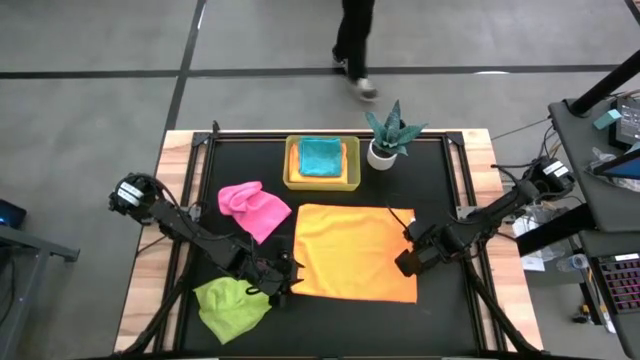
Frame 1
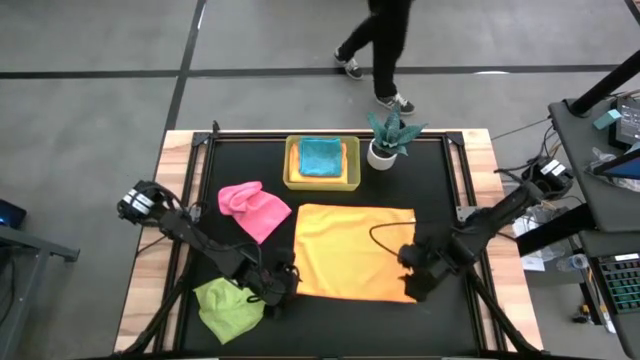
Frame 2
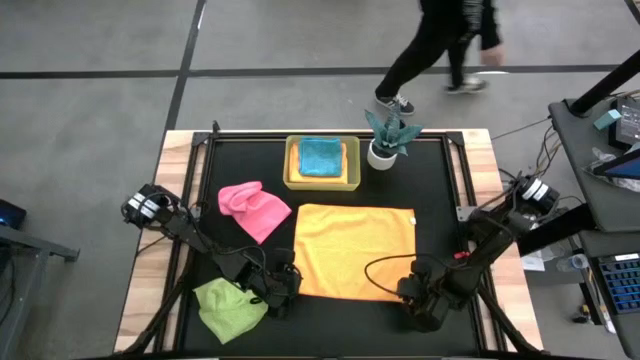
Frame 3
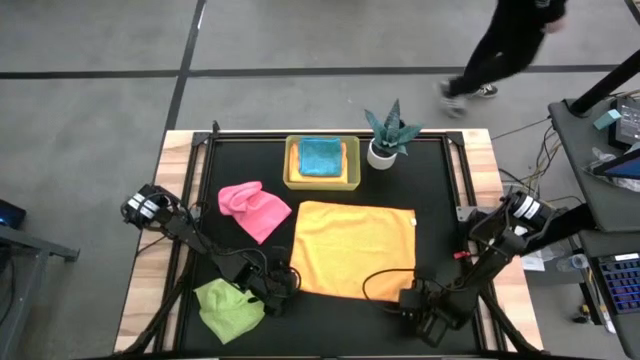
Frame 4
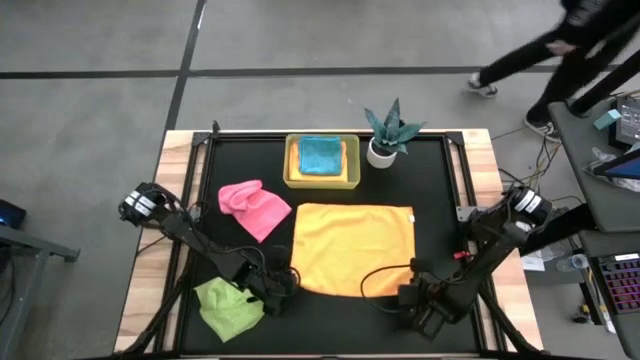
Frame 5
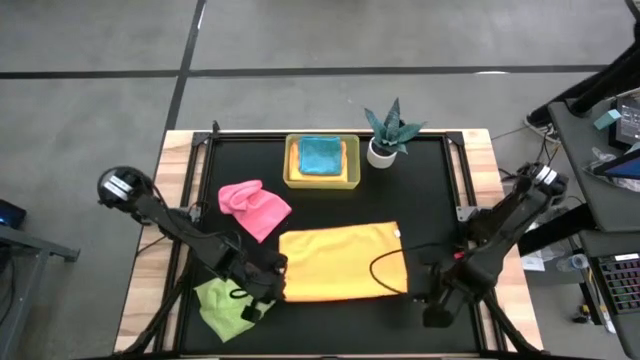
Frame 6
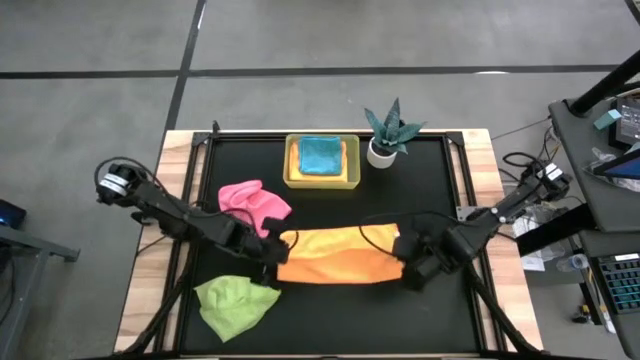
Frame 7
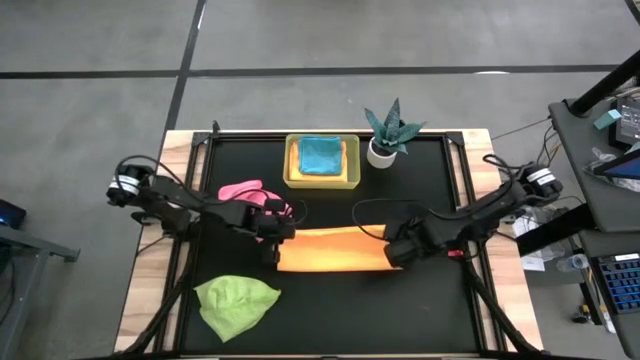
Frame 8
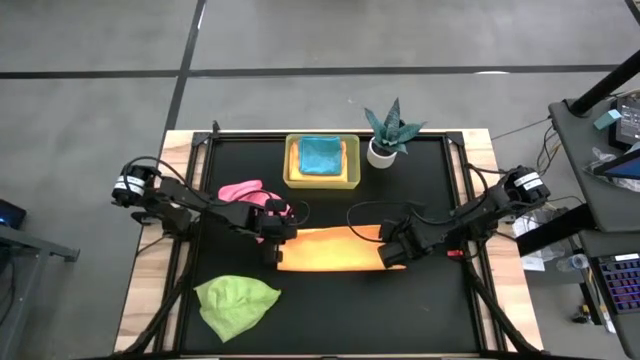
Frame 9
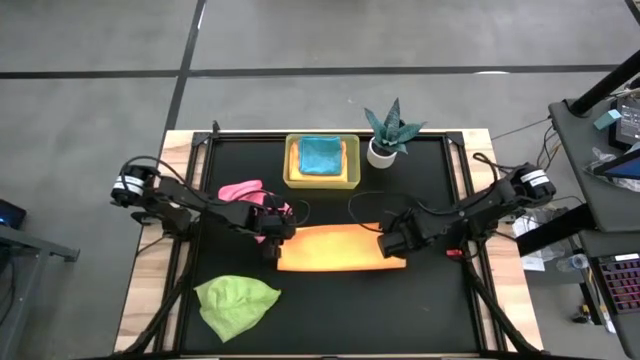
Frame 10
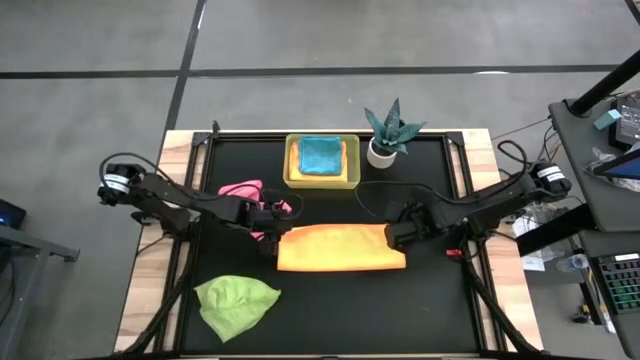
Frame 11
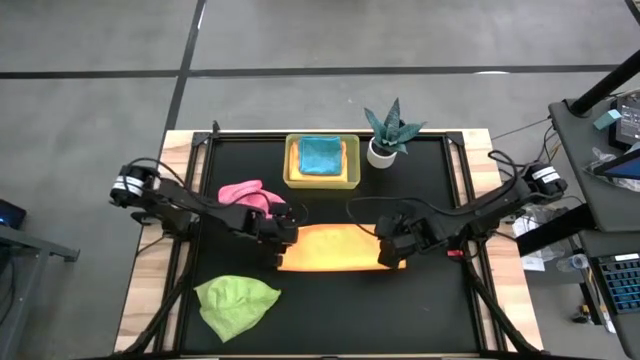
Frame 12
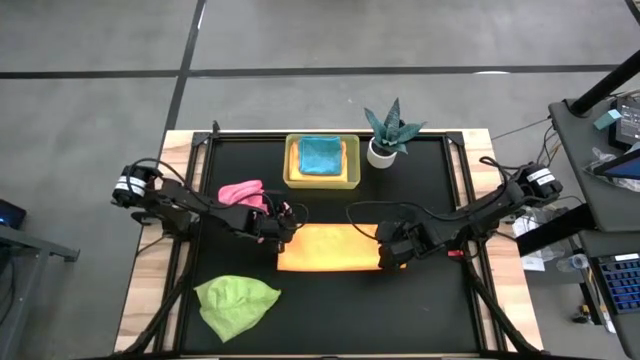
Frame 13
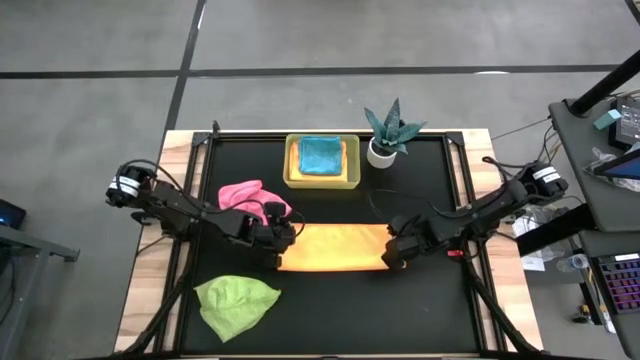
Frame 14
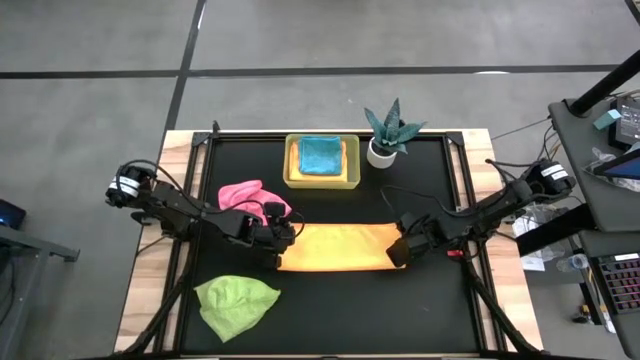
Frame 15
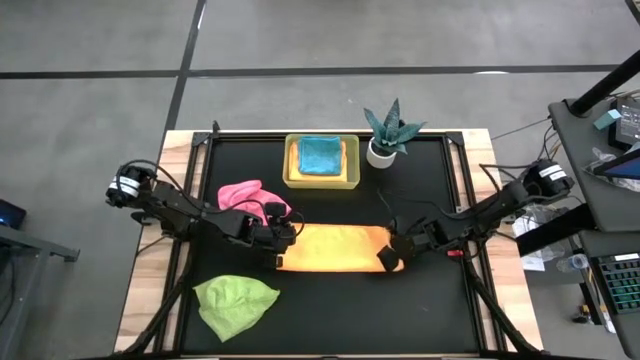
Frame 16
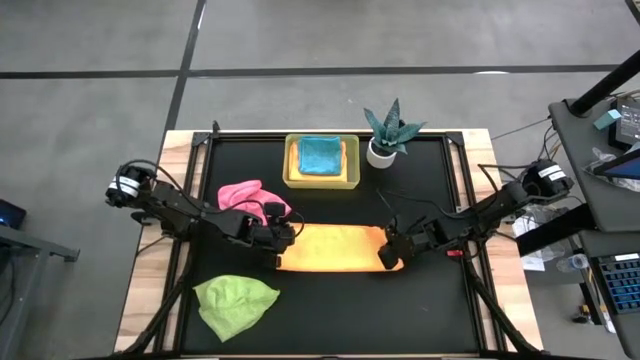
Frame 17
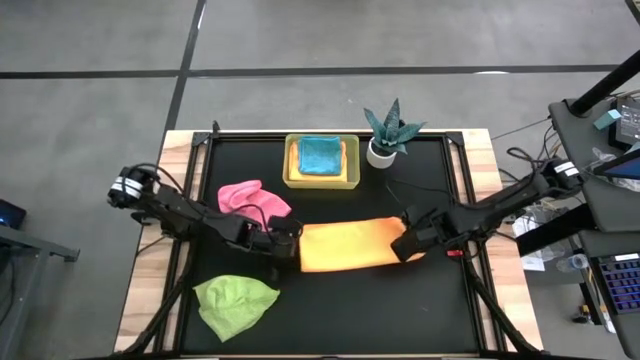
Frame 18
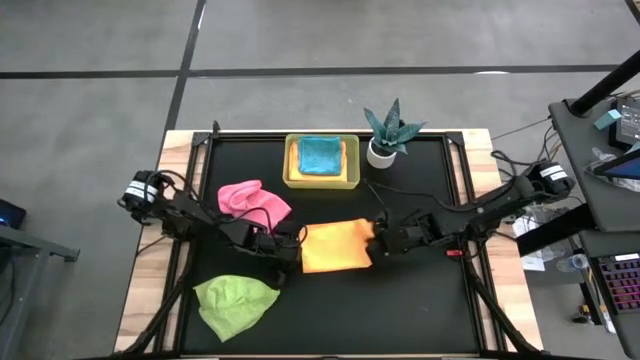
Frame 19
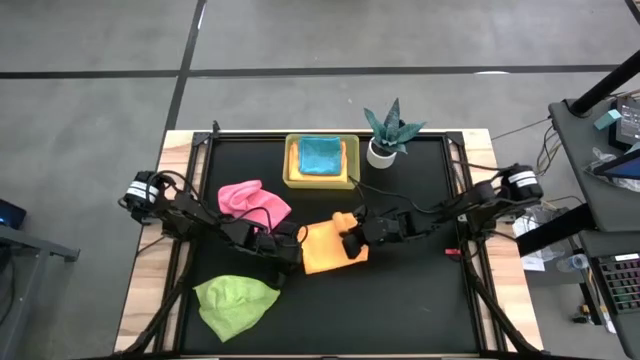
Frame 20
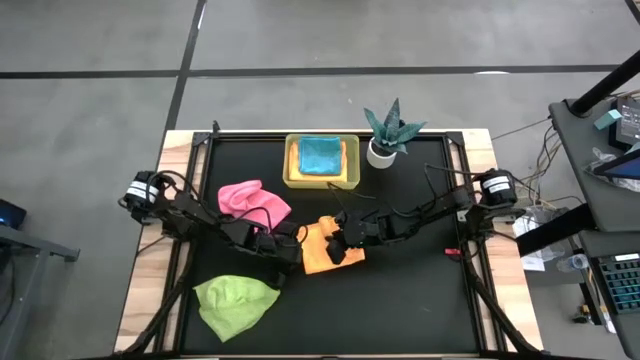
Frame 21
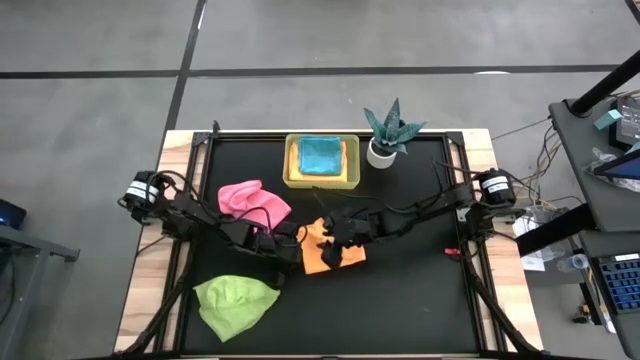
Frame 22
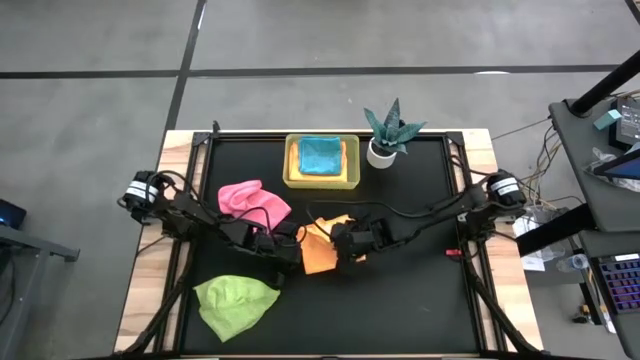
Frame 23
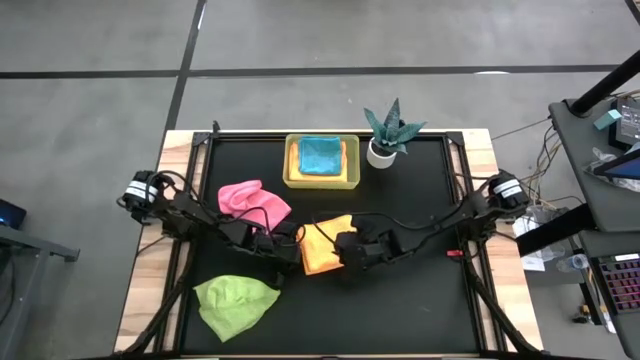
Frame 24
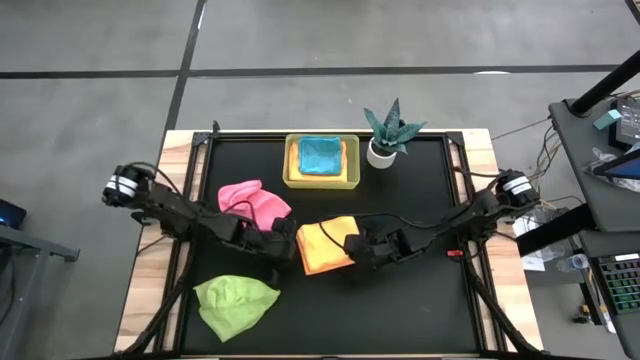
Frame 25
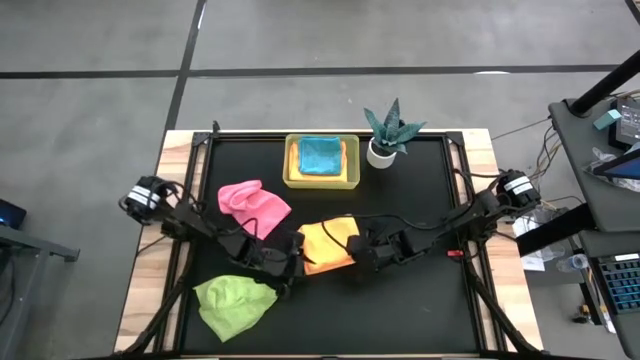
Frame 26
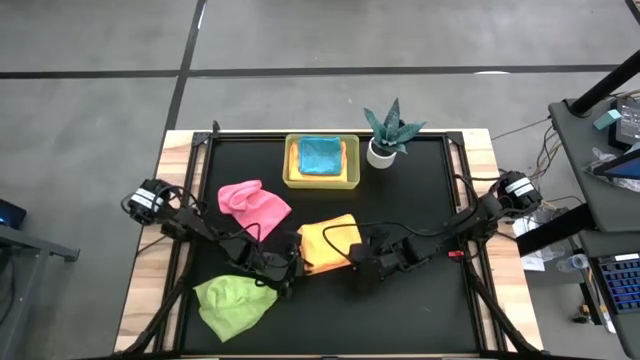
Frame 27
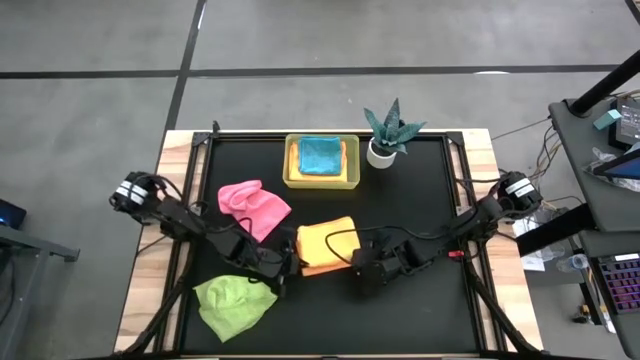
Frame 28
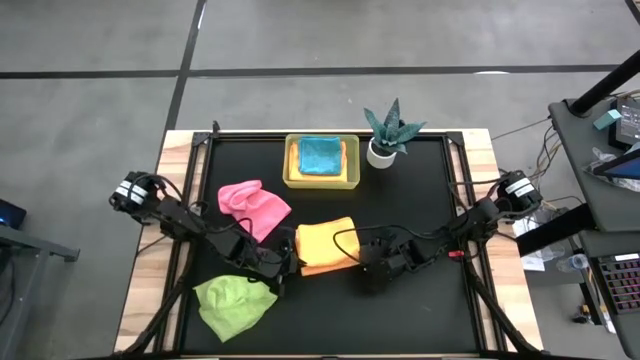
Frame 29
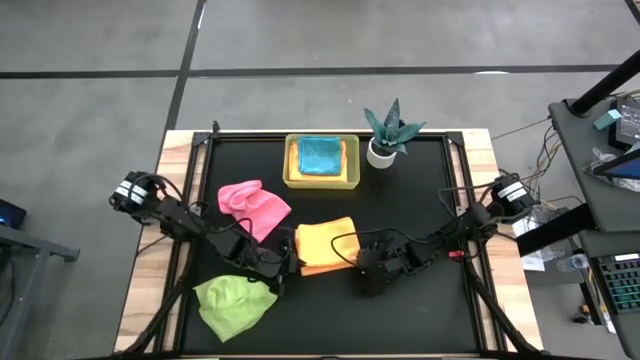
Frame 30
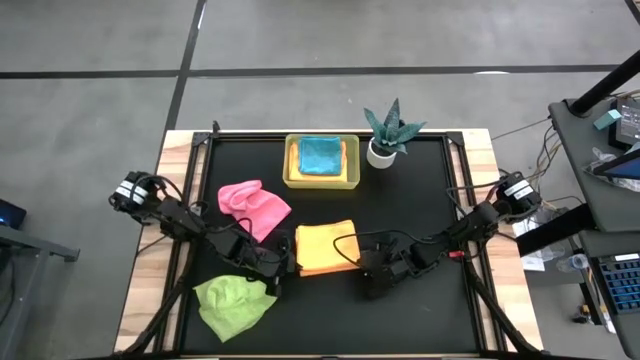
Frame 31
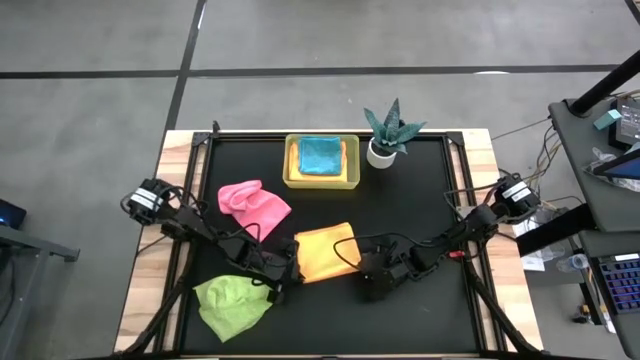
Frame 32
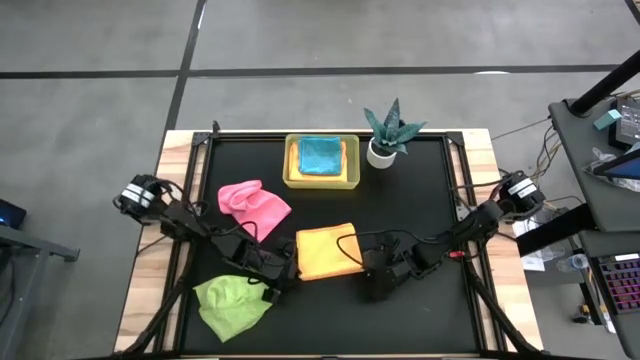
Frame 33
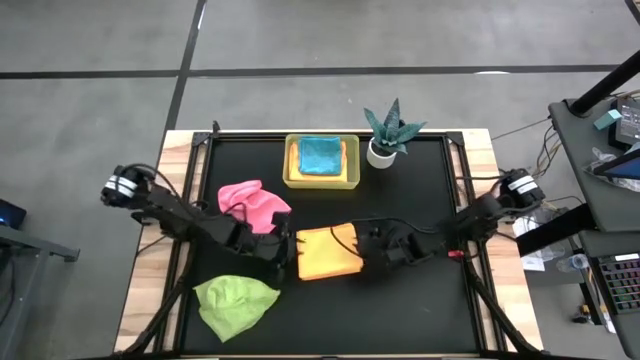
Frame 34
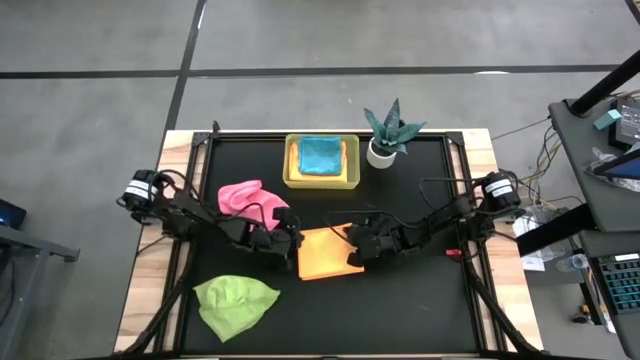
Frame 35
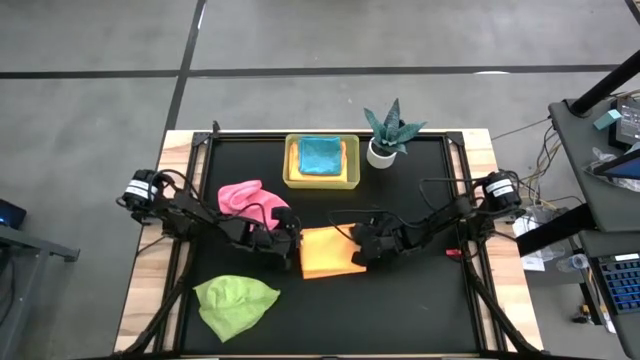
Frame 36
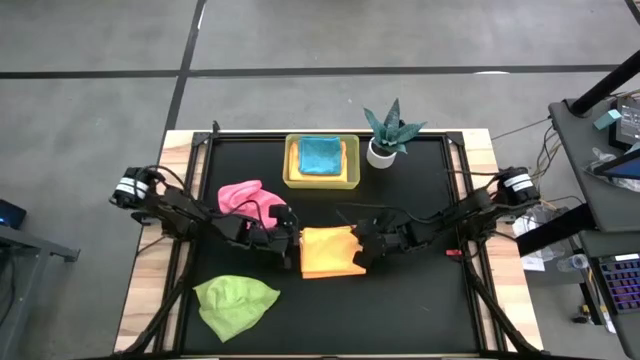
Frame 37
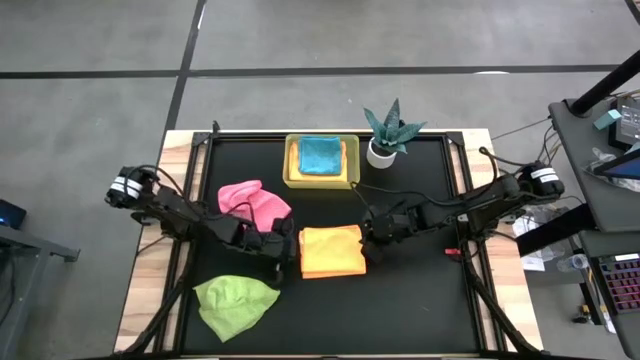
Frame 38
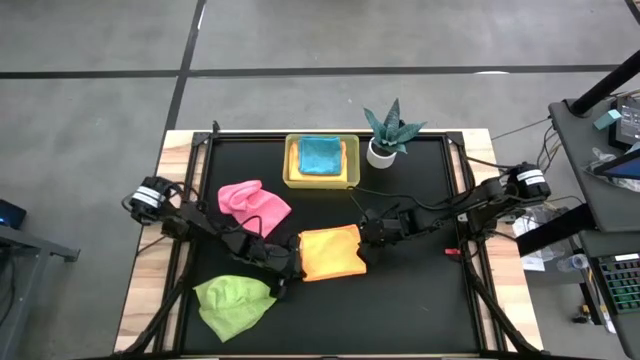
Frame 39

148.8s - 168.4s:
Task: Fold microfiber towels
Fold the orange microfiber cloth

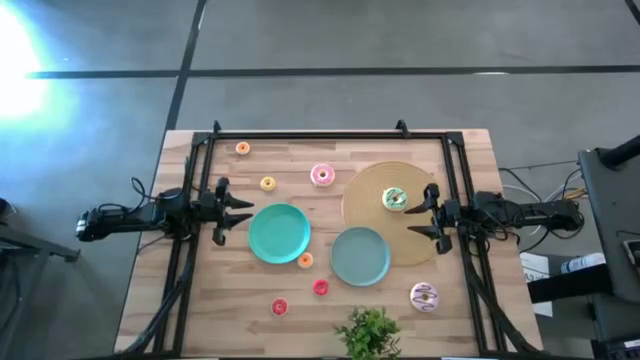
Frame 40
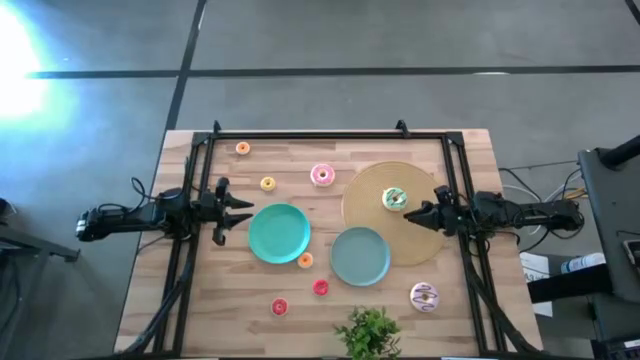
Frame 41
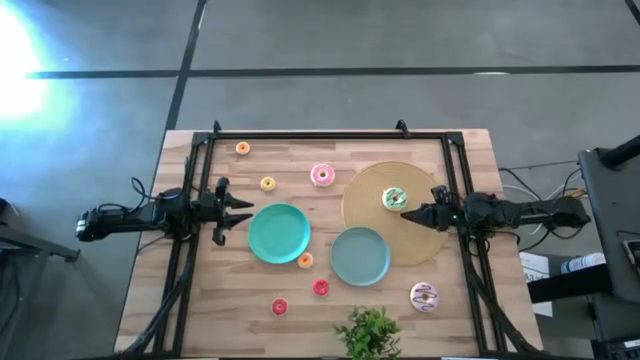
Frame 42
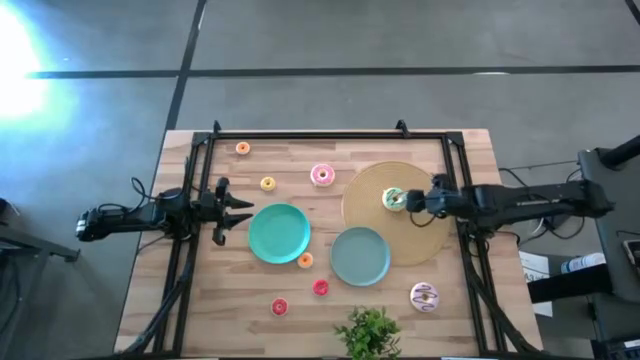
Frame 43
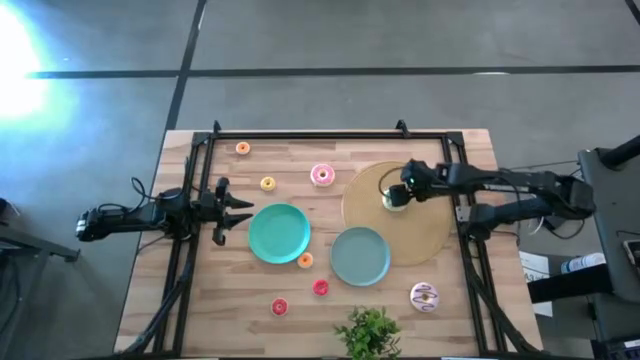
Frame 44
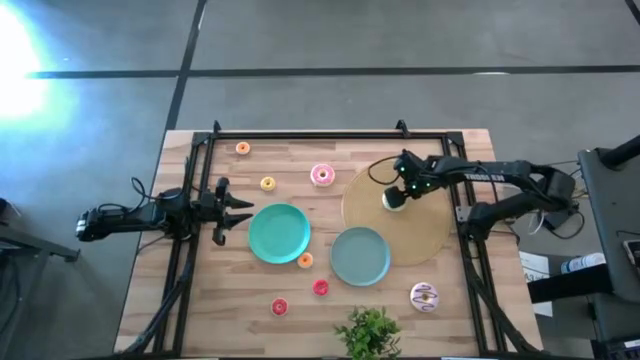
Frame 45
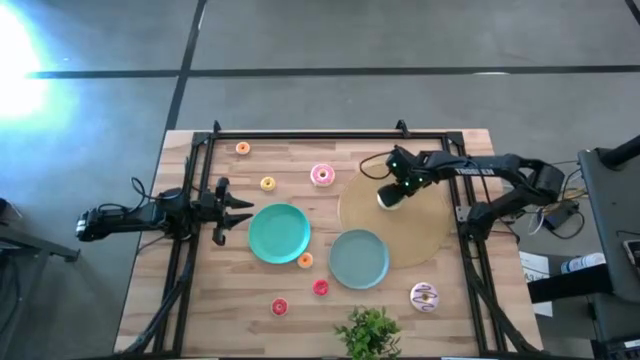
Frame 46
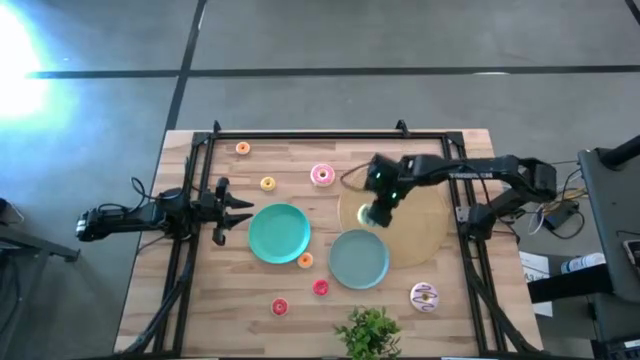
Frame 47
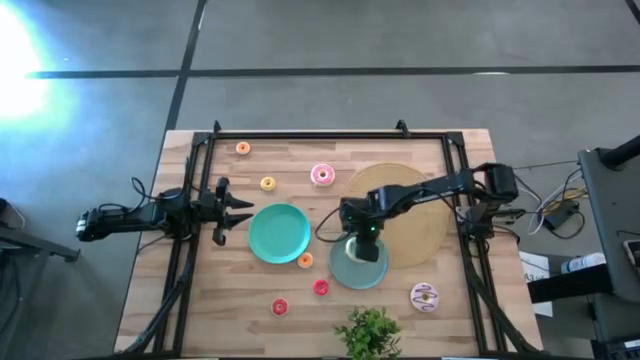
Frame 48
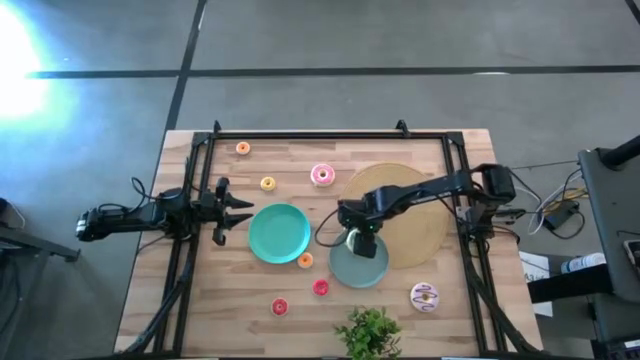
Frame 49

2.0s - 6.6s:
Task: Pick & Place donuts
Put the large blue donut on the blue plate
